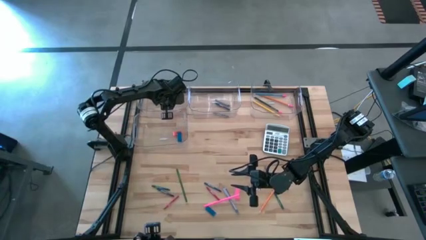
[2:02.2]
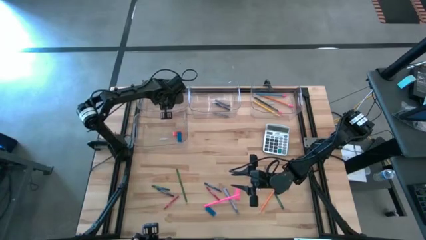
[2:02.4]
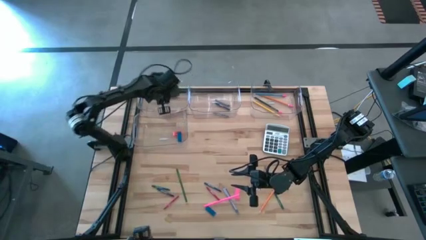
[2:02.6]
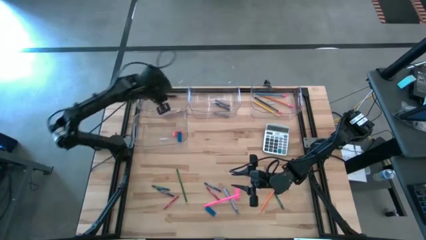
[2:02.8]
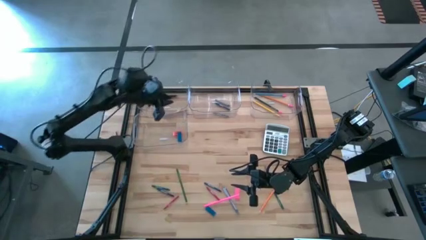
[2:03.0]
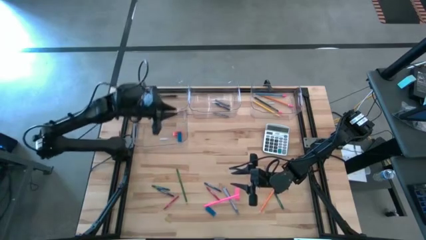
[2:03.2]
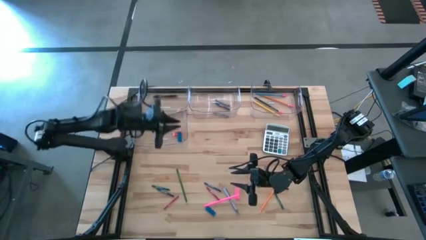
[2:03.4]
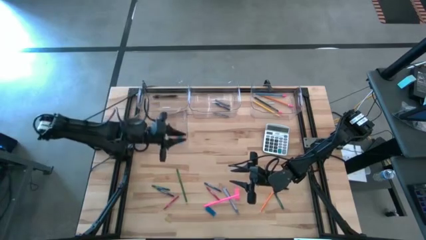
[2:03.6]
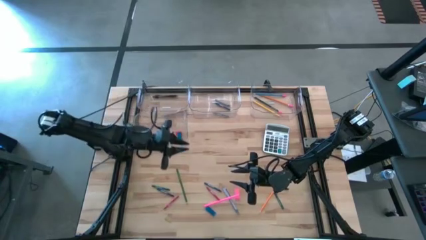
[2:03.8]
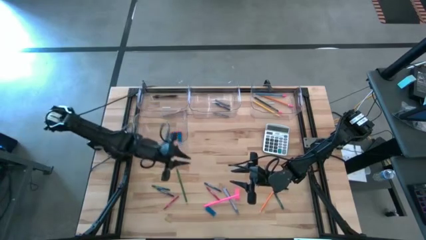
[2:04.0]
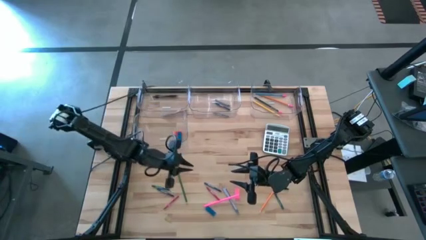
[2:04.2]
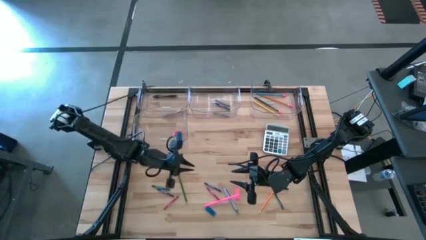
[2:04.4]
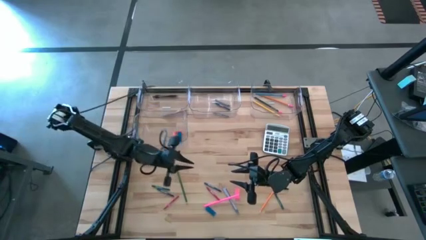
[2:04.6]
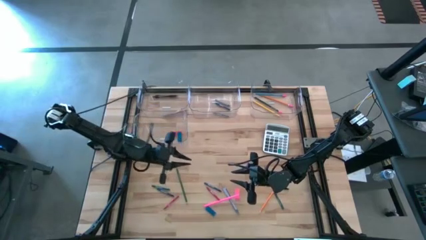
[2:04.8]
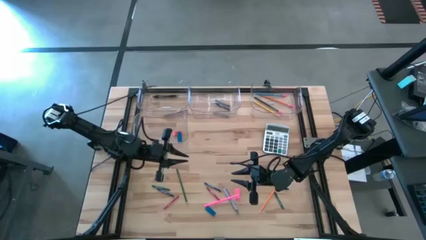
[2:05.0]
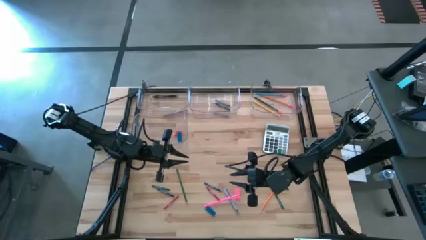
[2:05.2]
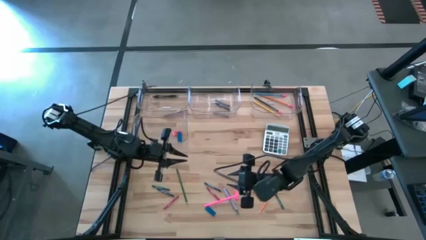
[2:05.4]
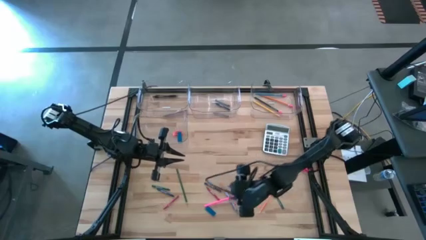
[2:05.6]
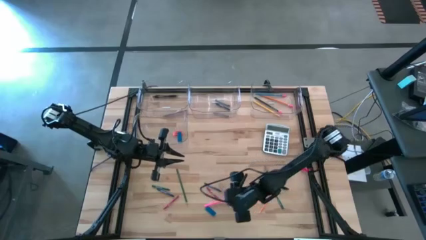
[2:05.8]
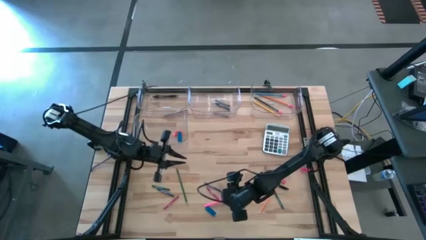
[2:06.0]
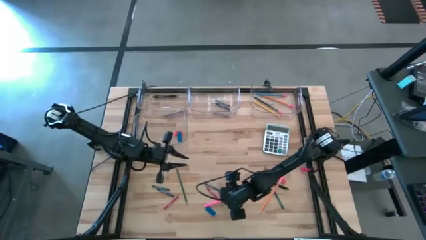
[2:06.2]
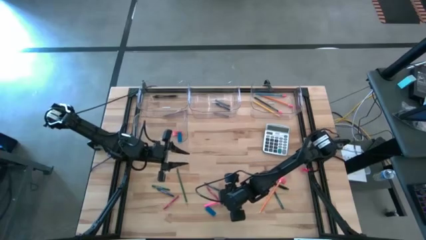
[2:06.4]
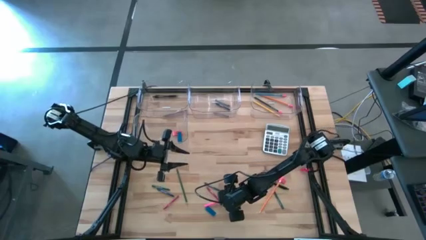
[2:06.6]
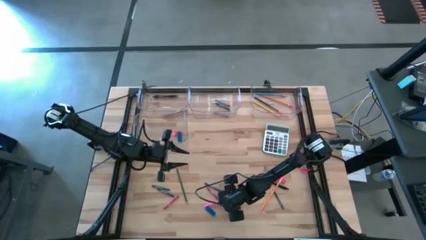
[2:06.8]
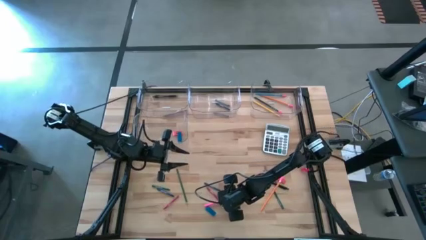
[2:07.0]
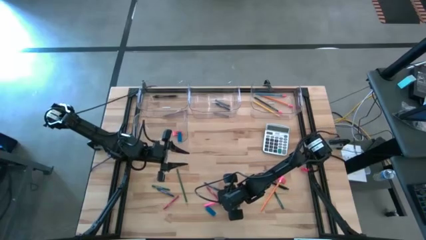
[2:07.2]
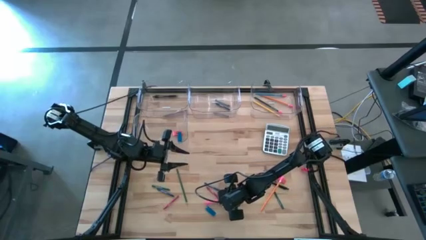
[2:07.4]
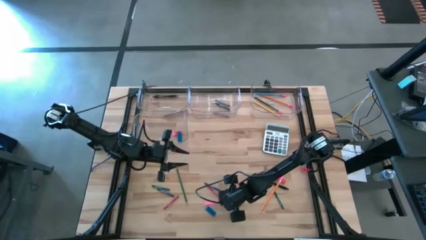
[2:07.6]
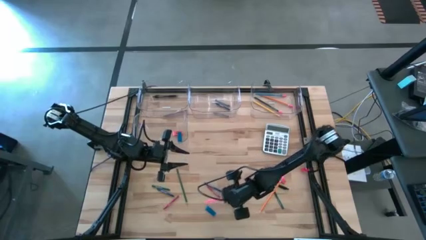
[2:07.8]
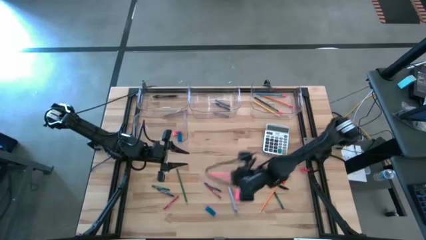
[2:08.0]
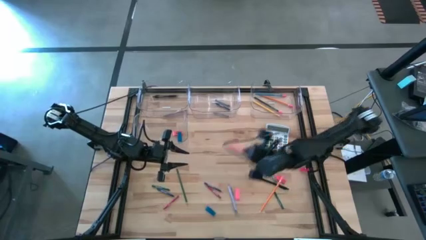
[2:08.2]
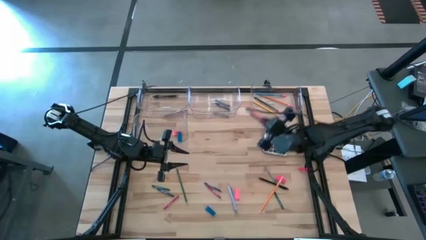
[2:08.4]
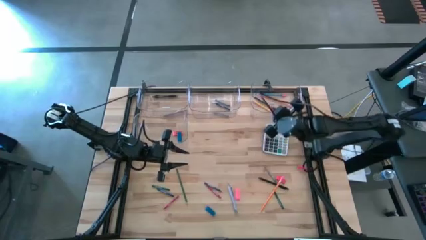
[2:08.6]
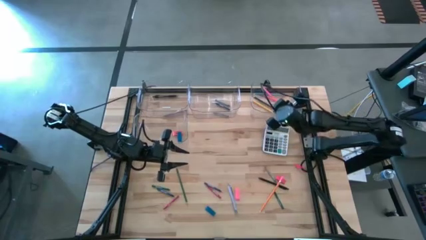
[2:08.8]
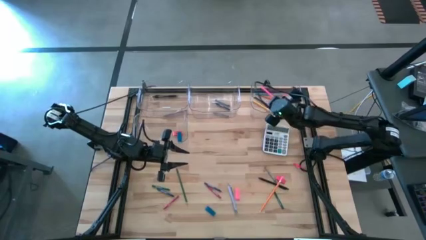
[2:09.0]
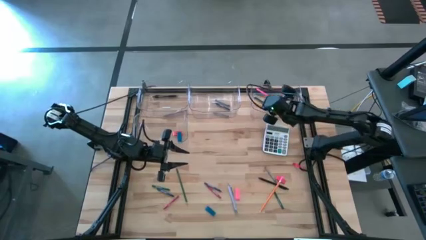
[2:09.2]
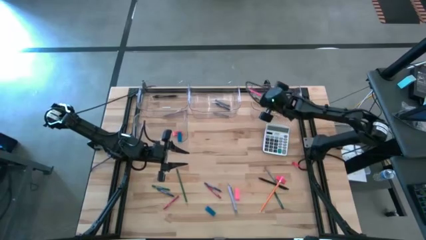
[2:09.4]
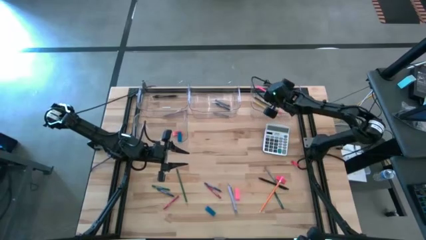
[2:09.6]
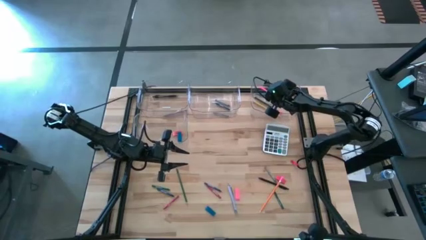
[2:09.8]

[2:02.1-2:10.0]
Task: Sort crayons/erasers/pens/pencils in bins
Put the pink pencil into the top right transparent bin

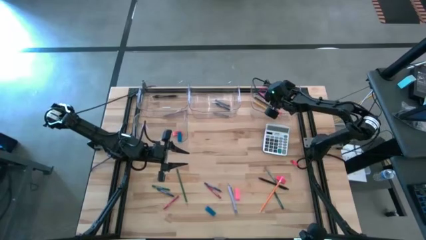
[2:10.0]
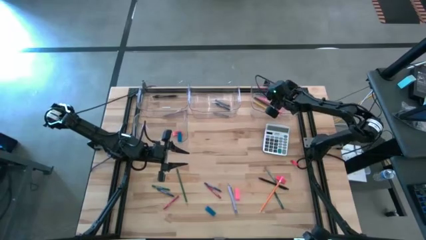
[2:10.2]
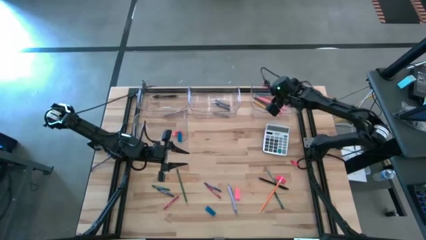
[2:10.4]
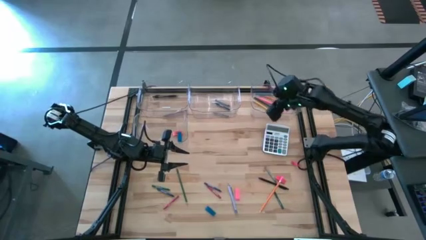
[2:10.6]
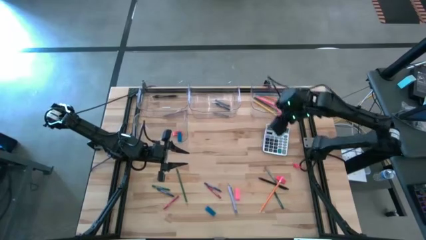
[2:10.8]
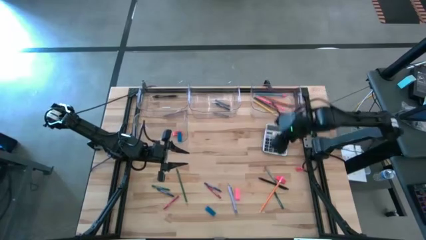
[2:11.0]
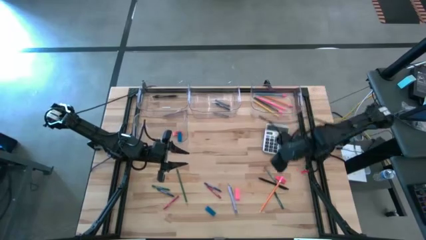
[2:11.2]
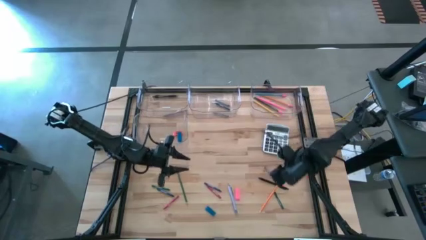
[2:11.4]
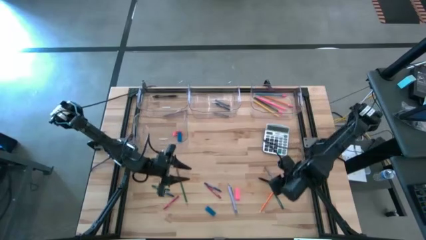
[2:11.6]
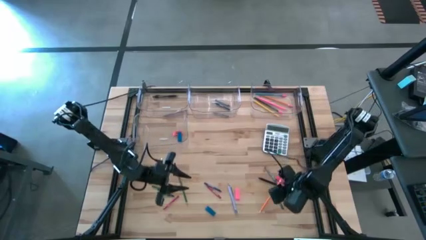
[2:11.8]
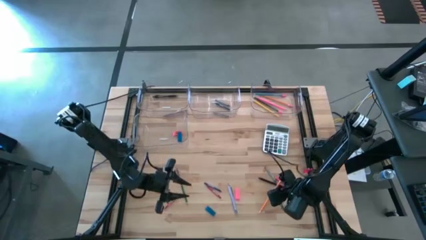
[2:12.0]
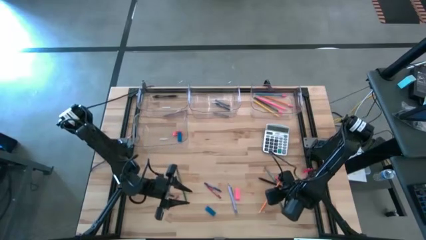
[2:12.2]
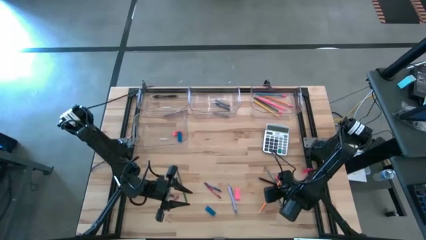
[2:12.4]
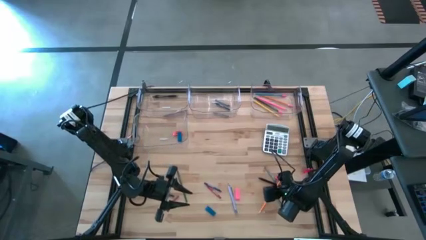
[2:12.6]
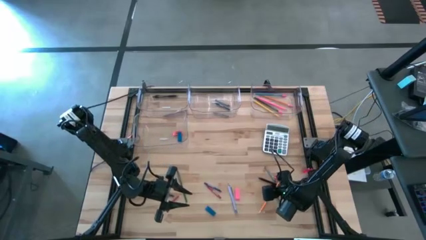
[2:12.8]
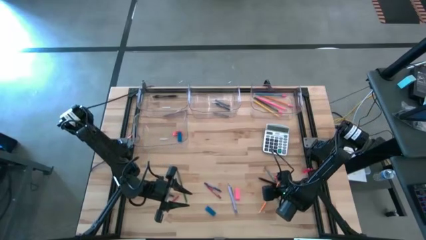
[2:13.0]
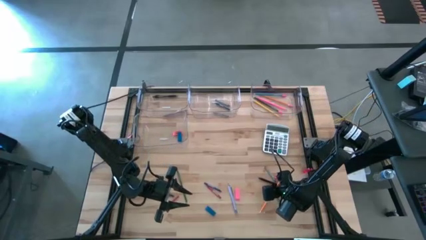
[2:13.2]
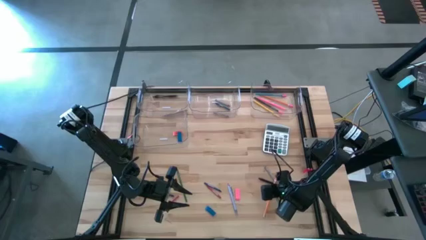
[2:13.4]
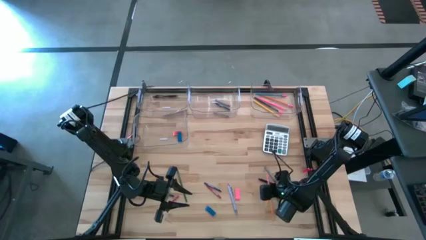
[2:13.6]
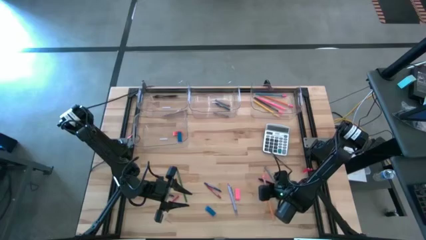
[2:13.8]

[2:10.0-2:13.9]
Put the orange pencil into the top right transparent bin

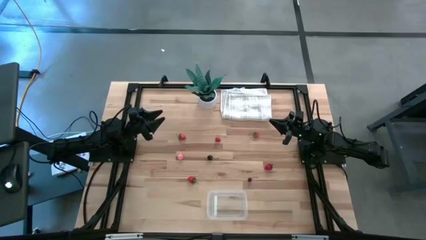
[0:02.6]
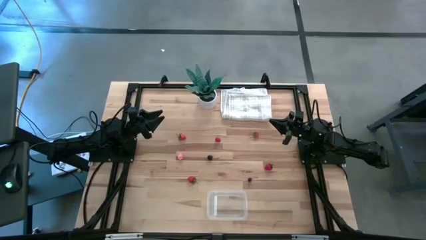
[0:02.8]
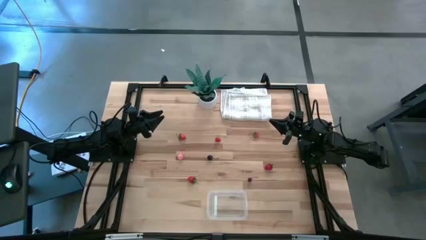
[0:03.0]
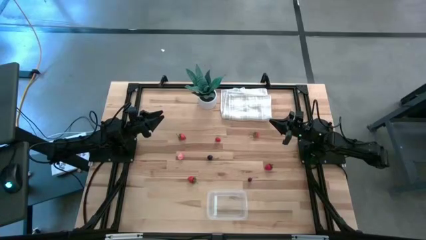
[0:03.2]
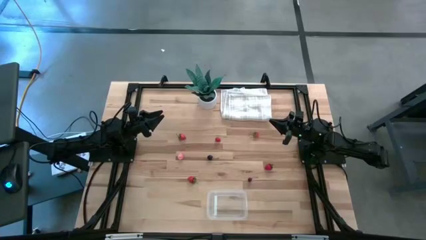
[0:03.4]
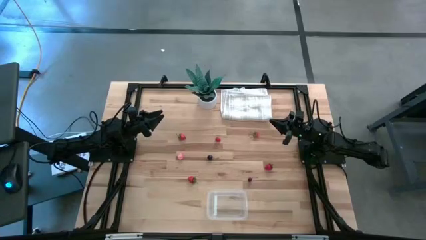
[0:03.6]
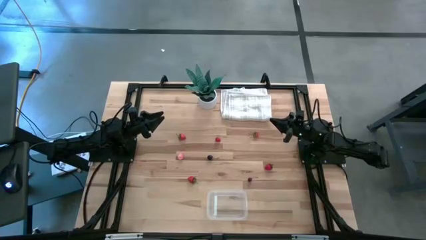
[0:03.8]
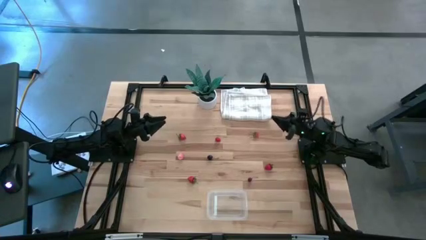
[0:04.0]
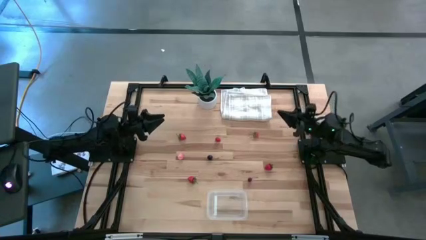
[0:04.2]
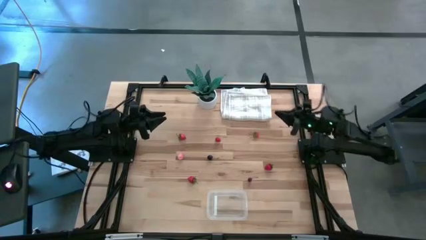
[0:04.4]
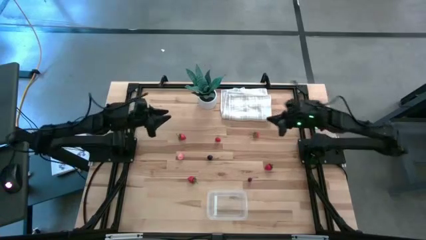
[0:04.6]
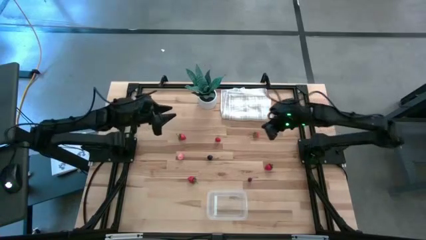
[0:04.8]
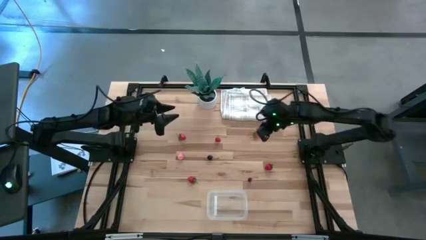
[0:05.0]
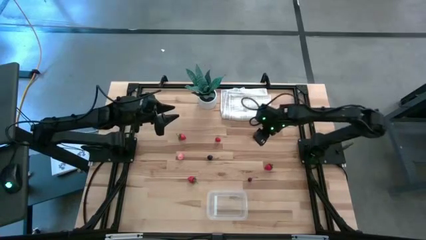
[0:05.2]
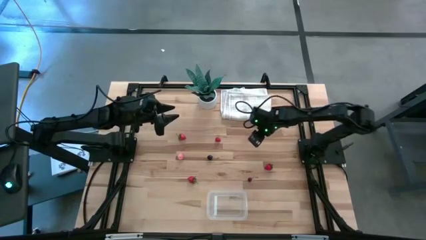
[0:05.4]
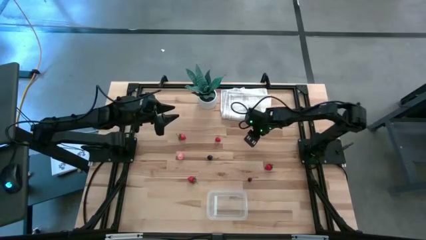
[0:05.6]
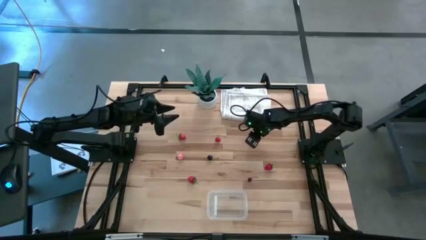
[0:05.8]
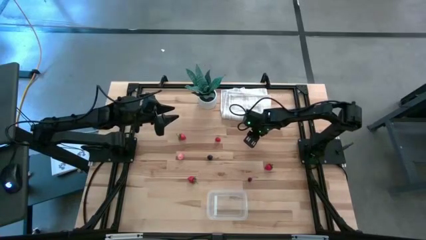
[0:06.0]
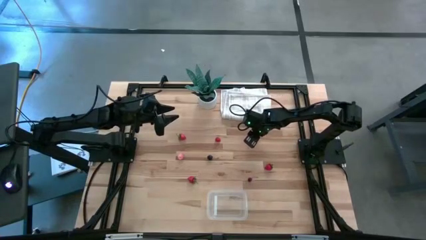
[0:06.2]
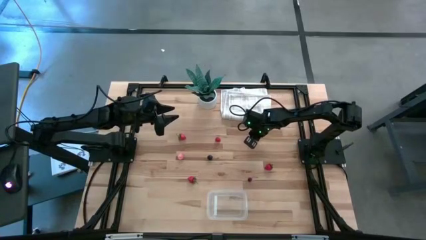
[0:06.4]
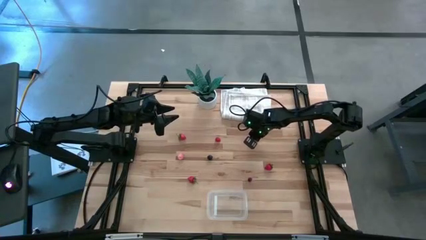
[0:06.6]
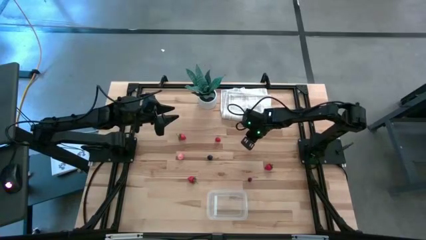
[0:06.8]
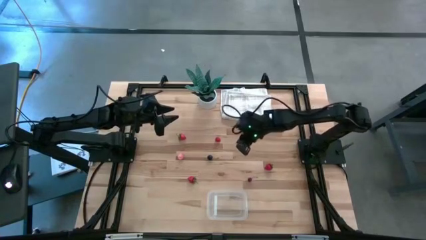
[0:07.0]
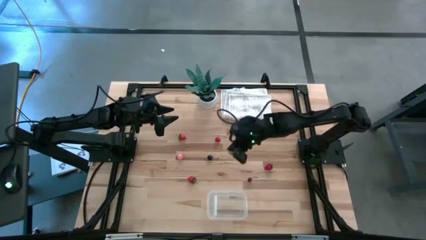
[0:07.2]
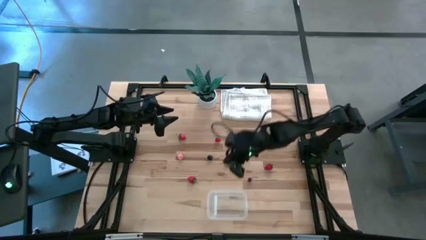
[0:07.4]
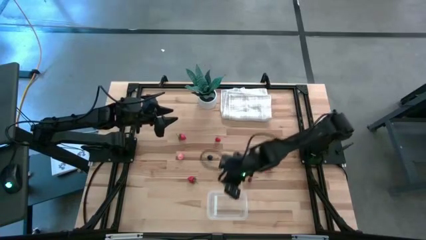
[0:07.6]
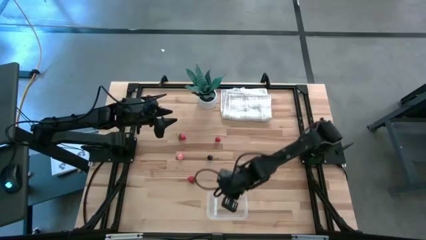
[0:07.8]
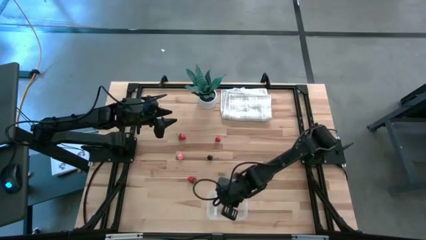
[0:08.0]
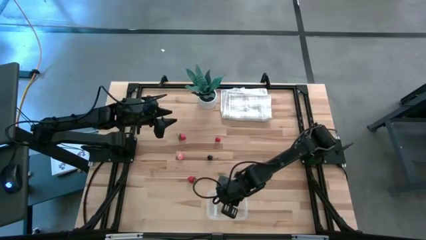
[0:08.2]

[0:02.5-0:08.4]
Task: Pick and placing Produce into tupperware
Put the strawberry into the transparent bin
